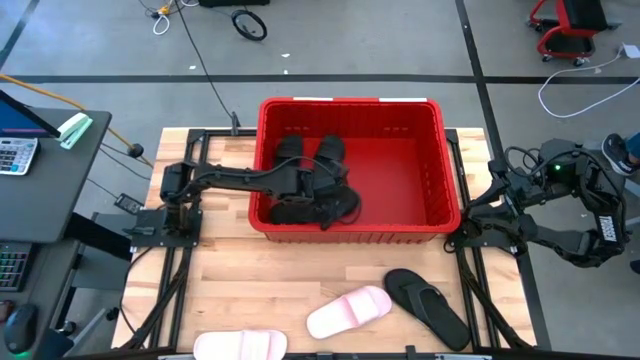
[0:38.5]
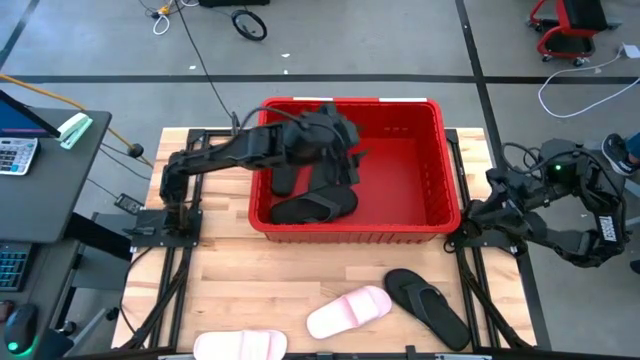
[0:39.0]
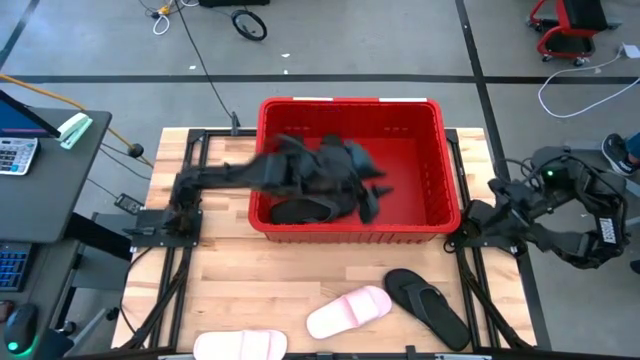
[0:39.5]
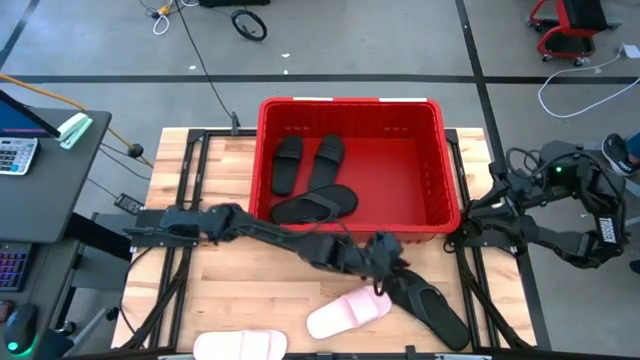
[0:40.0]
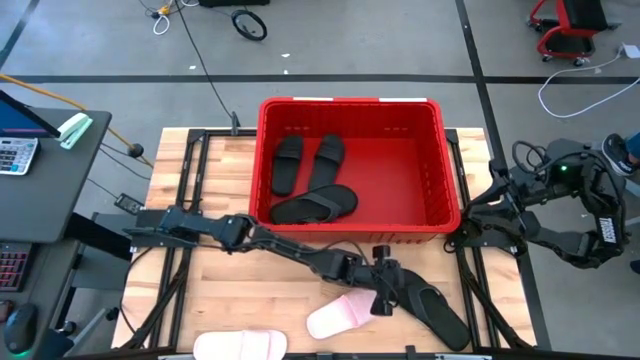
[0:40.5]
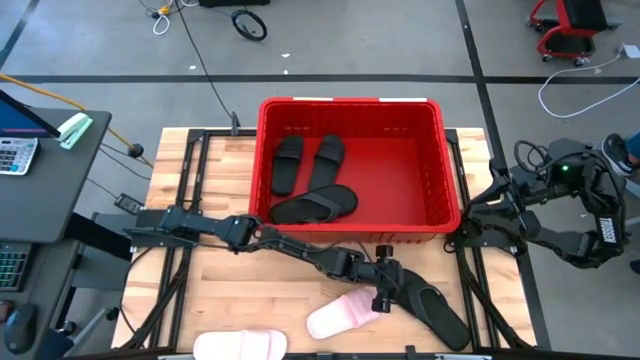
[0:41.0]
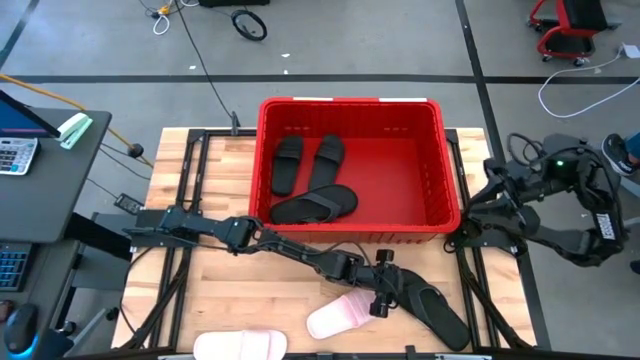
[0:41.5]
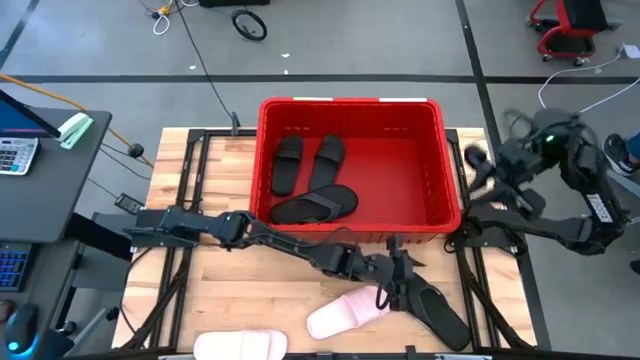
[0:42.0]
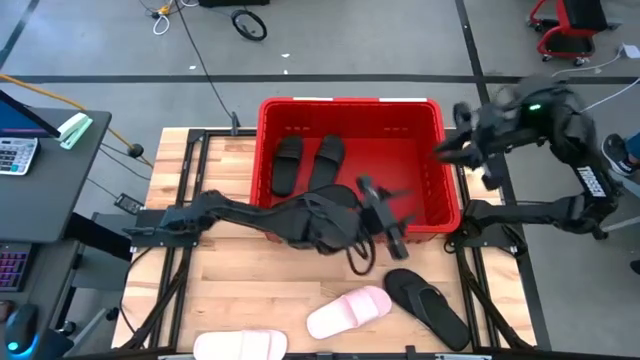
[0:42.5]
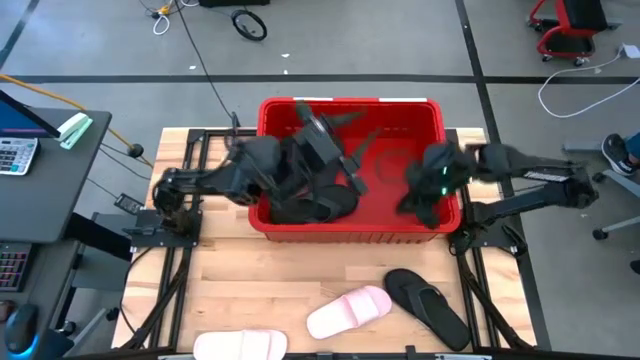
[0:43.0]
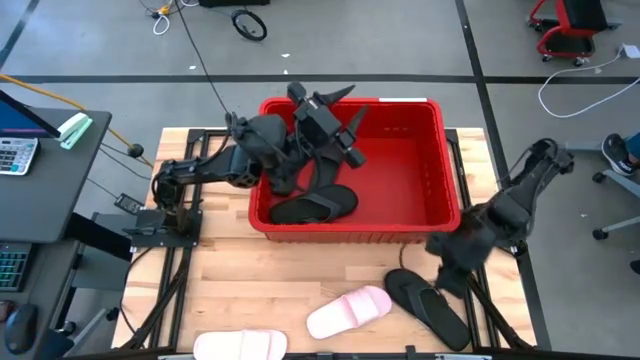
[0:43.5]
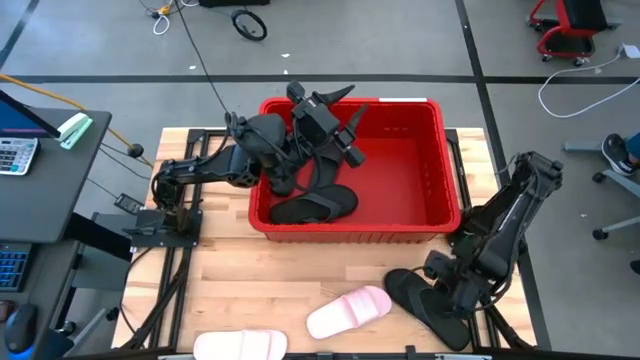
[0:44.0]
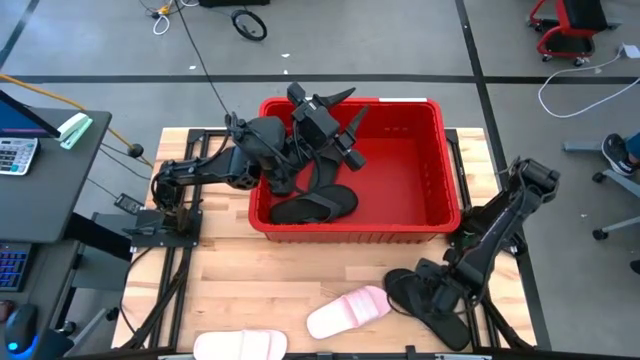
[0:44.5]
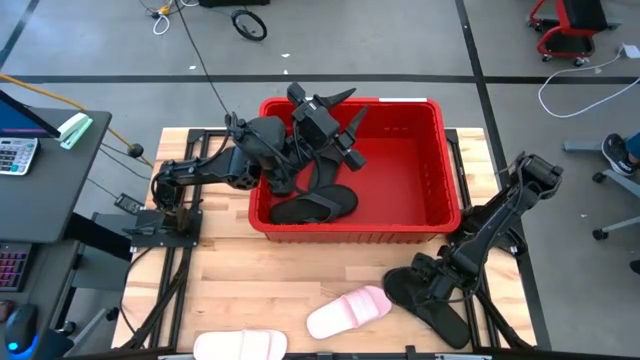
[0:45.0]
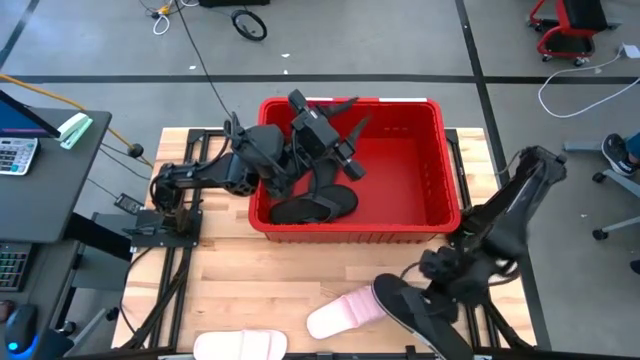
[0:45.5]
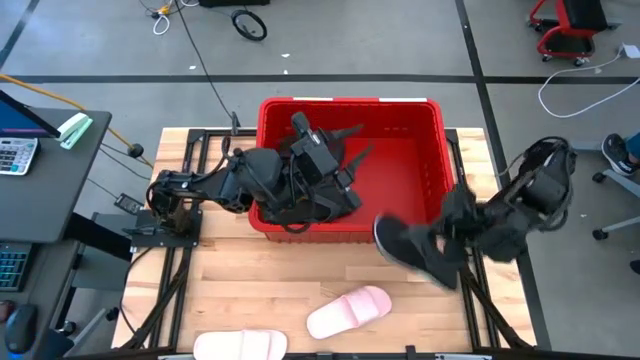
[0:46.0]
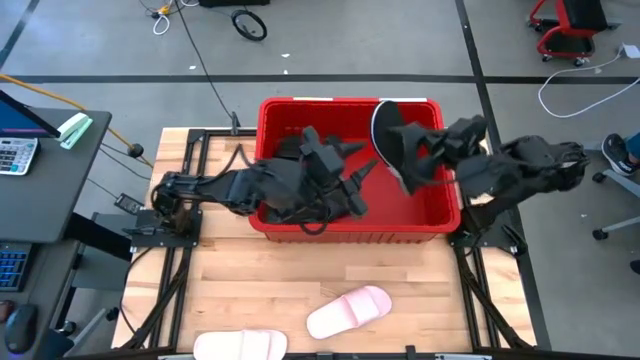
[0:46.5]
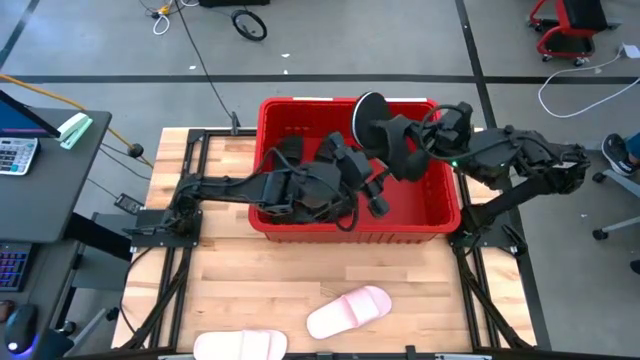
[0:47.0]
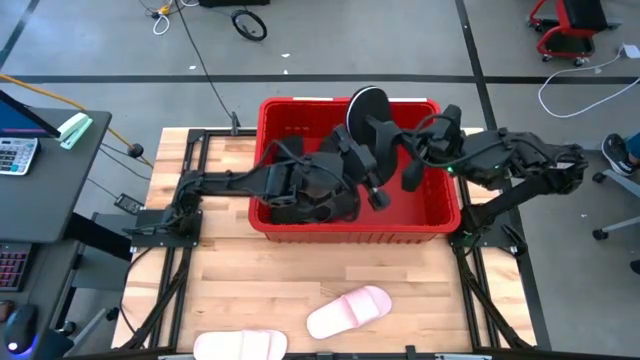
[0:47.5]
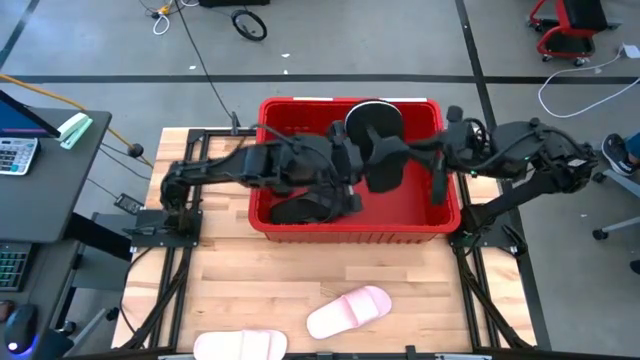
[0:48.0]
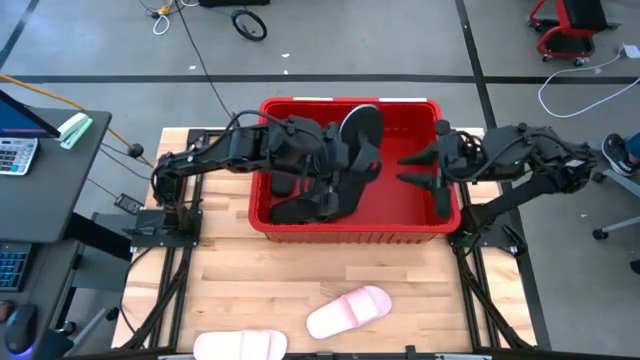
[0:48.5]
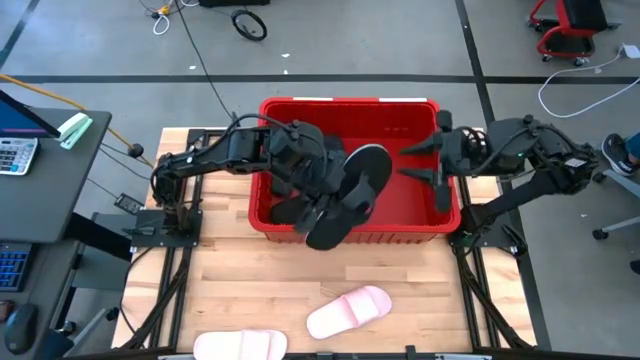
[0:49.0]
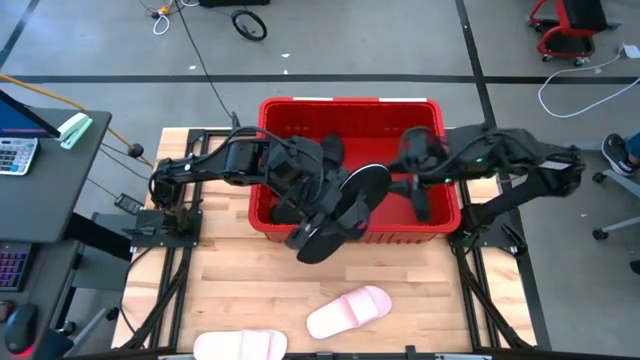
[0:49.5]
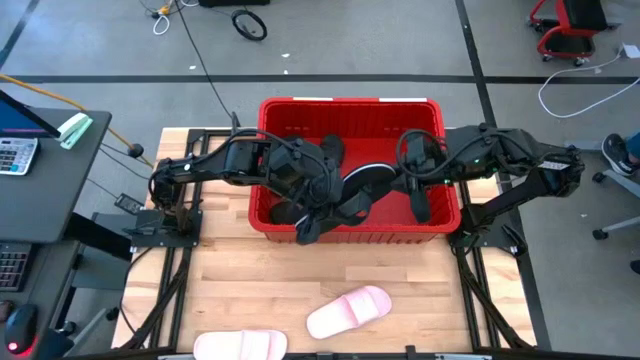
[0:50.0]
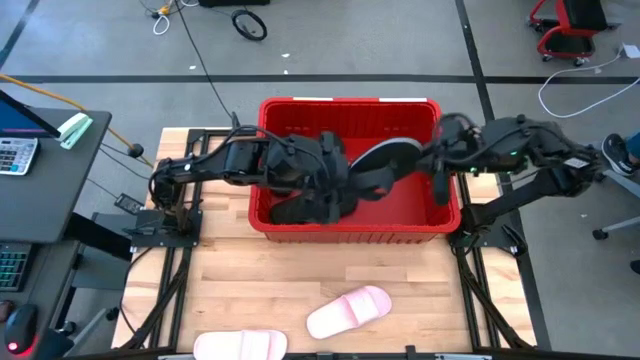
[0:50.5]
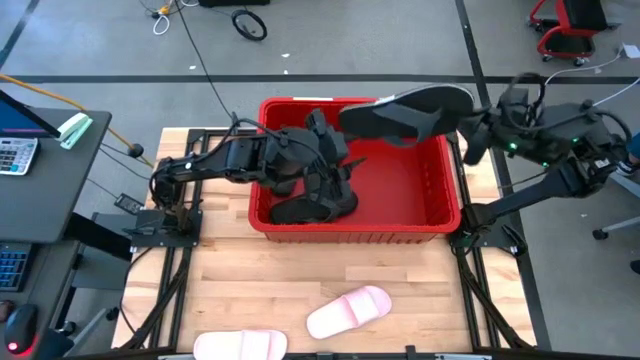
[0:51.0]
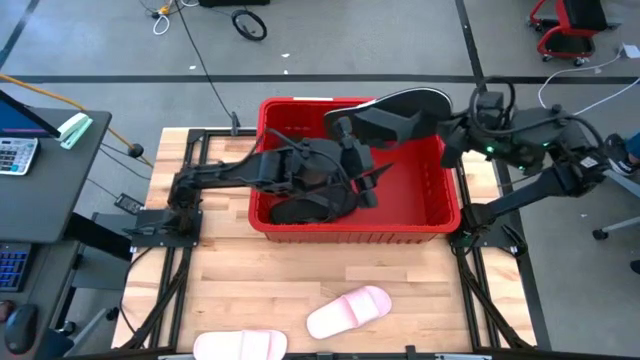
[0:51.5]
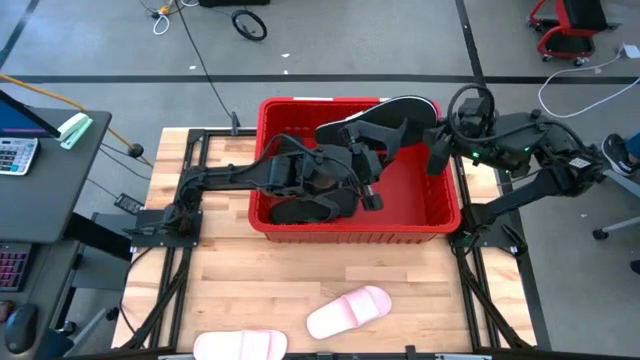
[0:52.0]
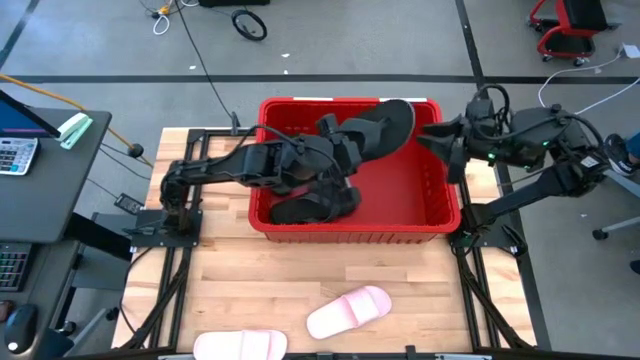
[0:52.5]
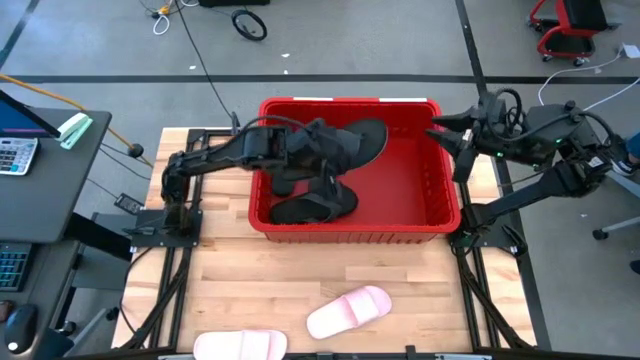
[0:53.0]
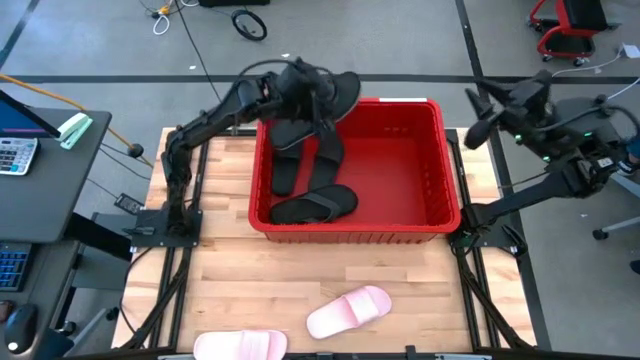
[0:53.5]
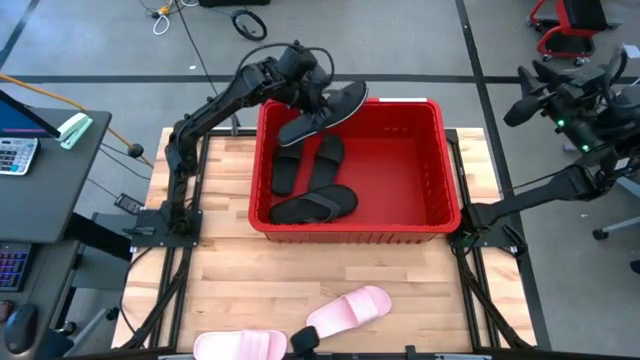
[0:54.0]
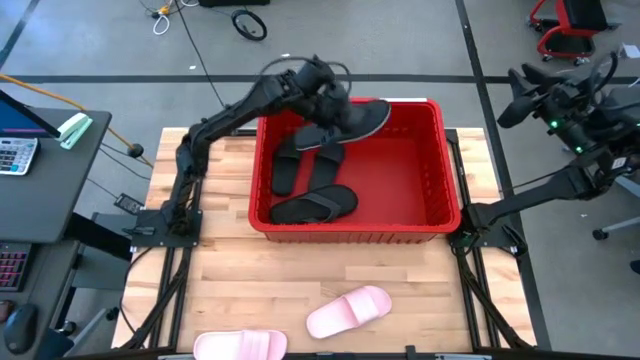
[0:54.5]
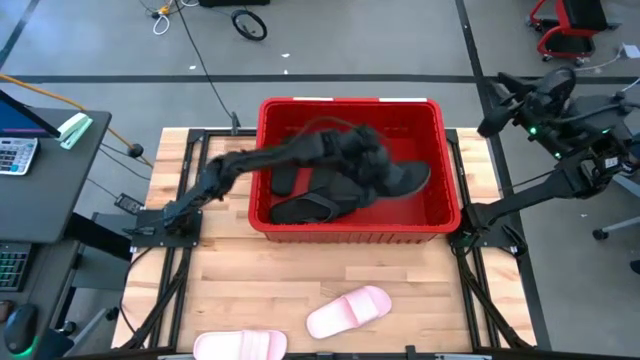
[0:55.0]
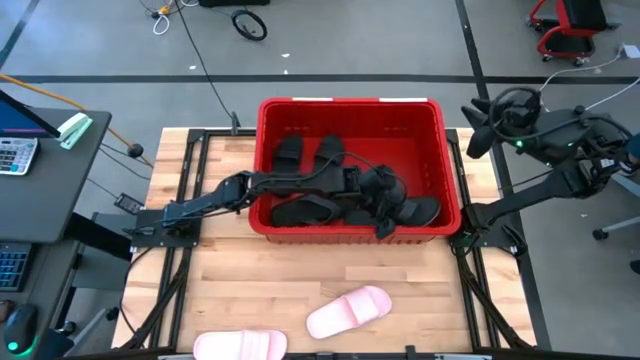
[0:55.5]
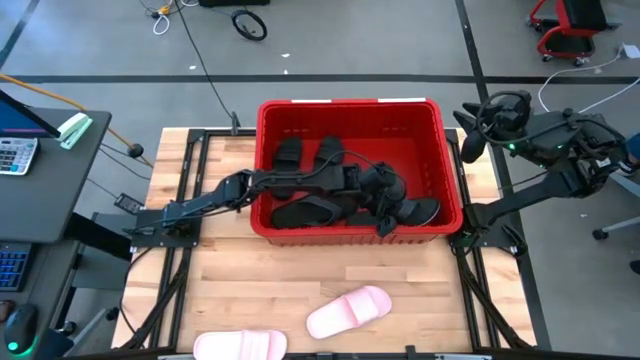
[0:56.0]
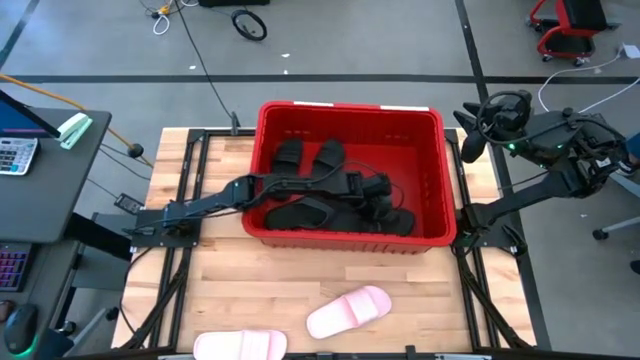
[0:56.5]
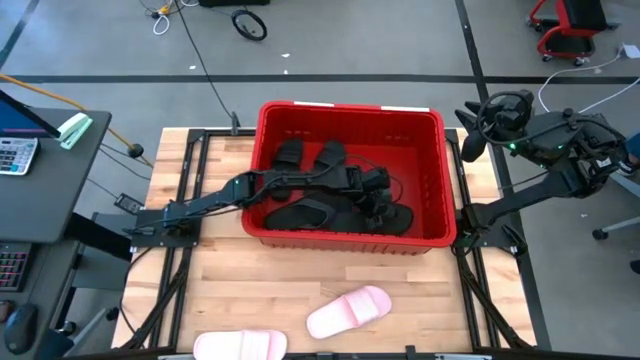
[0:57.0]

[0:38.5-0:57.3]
Task: Pick and place slides into bin
Put the black slipper into the red bin

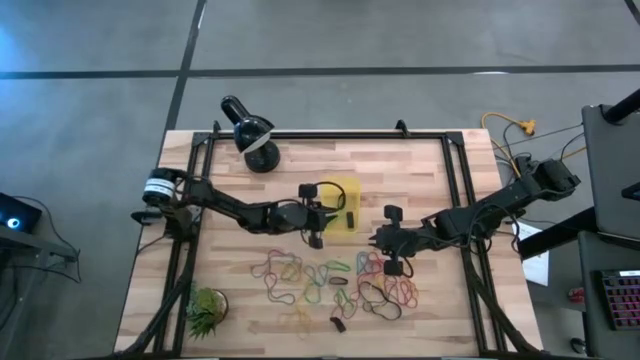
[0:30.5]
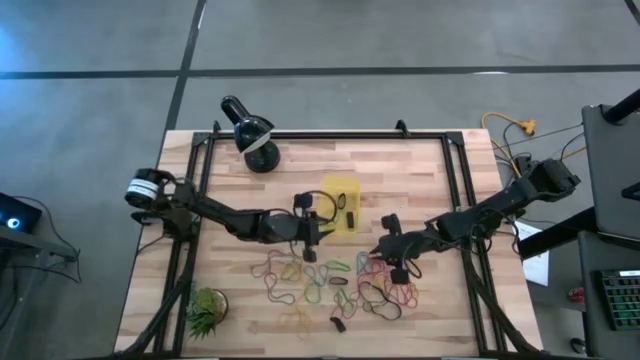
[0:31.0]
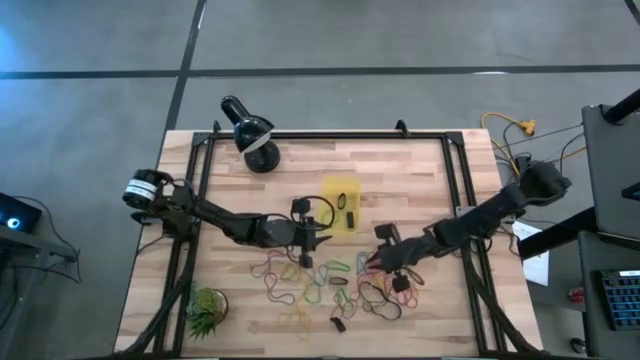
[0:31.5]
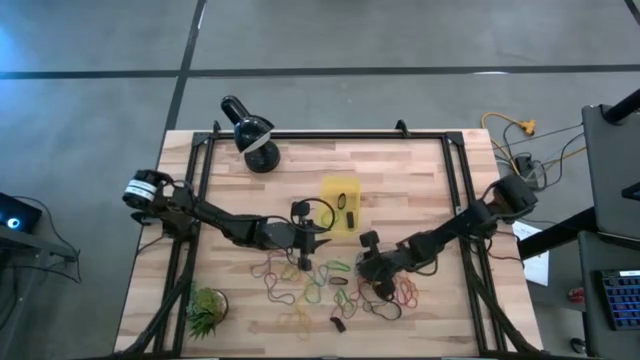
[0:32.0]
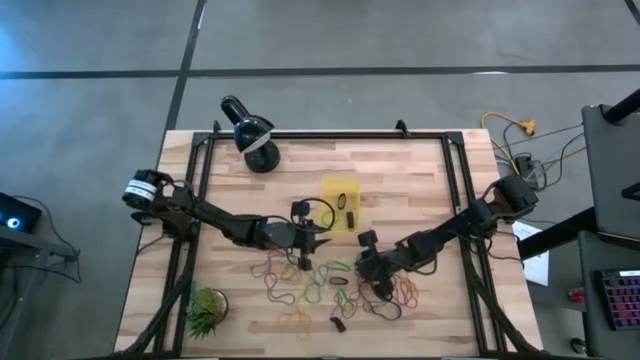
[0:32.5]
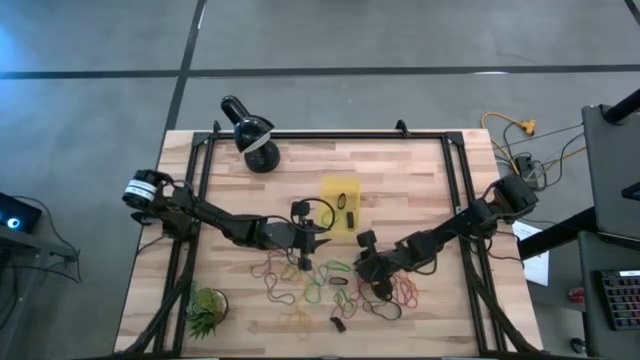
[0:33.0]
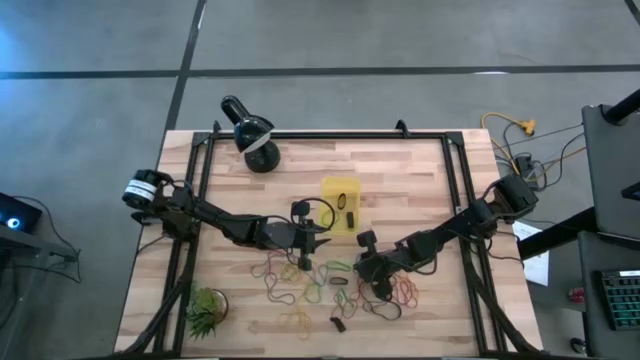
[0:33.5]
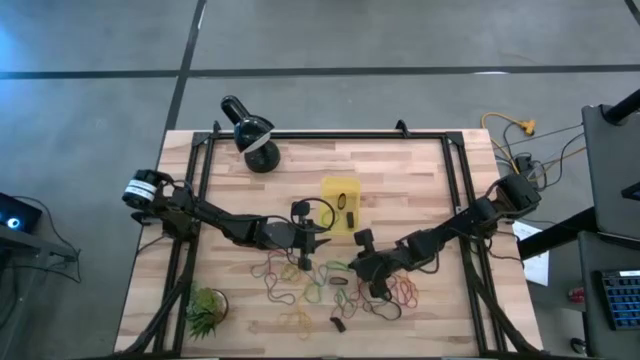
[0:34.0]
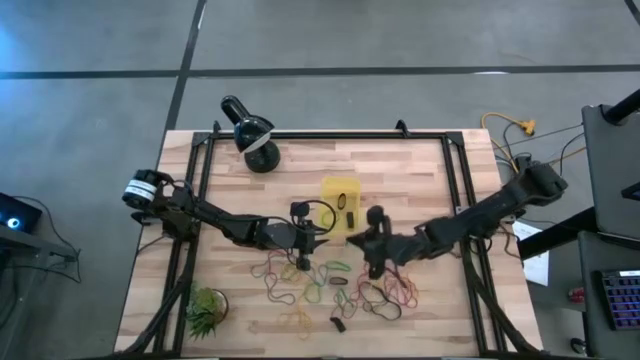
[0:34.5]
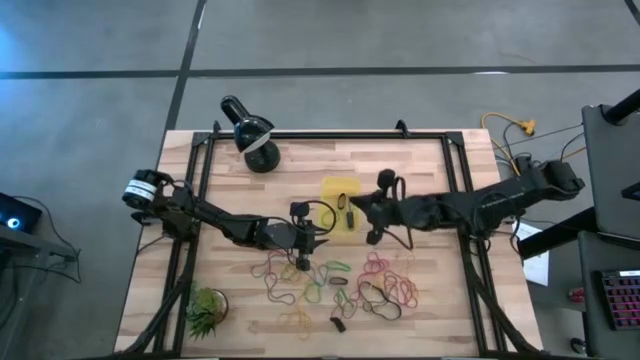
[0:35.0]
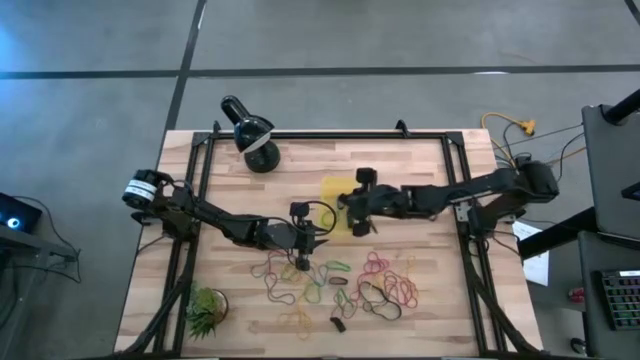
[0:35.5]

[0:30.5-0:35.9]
Task: Pick and place rubber bands into bin
Put the blue rubber band into the yellow bin
